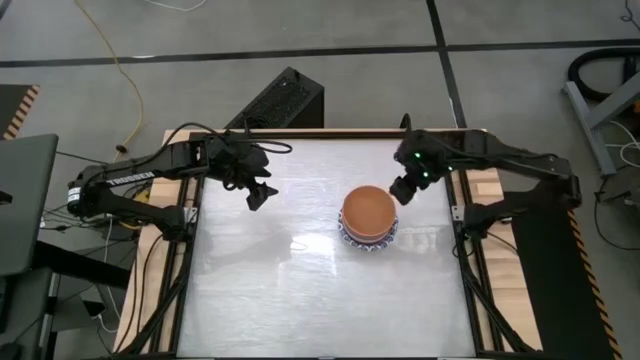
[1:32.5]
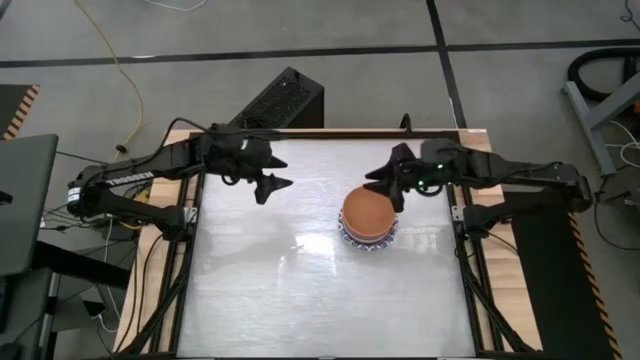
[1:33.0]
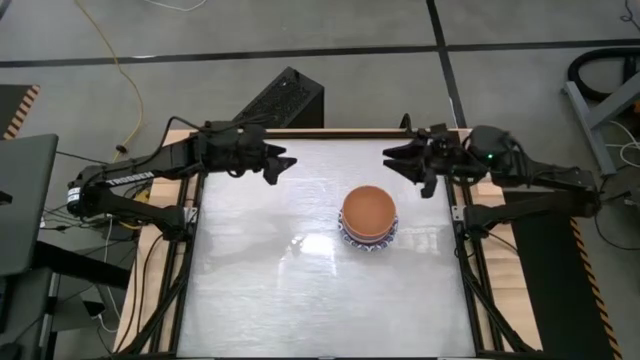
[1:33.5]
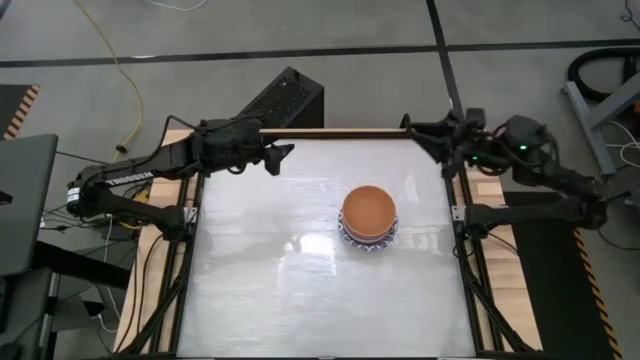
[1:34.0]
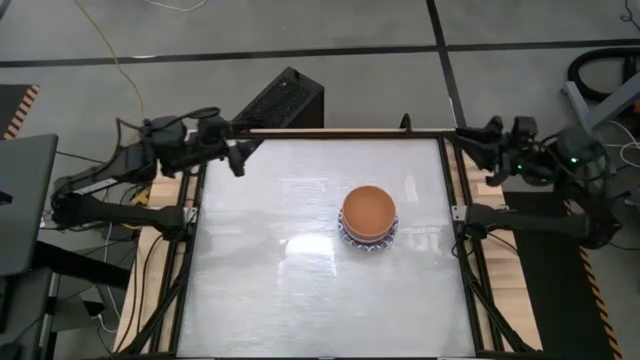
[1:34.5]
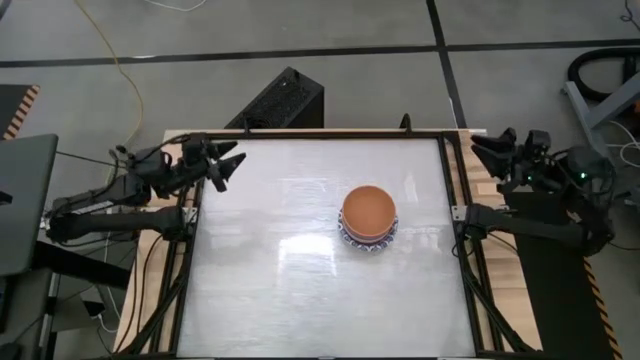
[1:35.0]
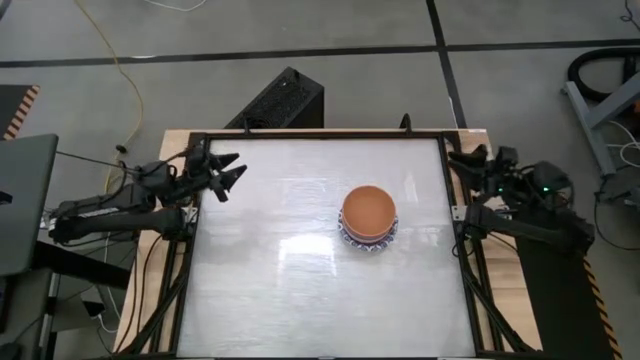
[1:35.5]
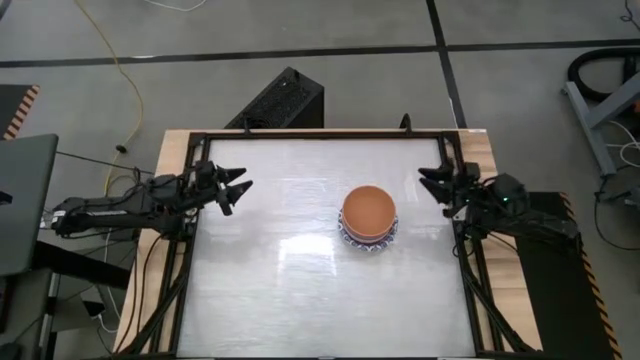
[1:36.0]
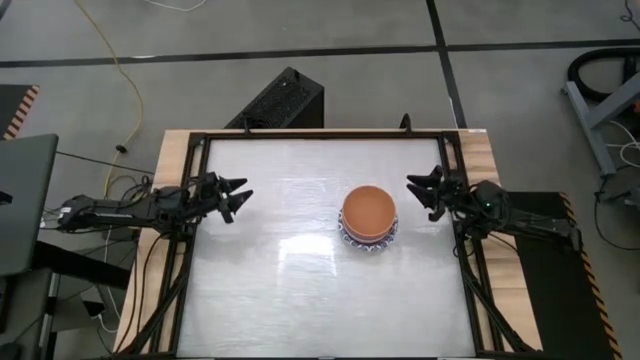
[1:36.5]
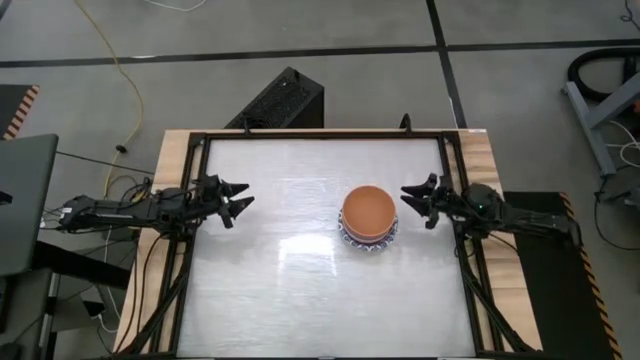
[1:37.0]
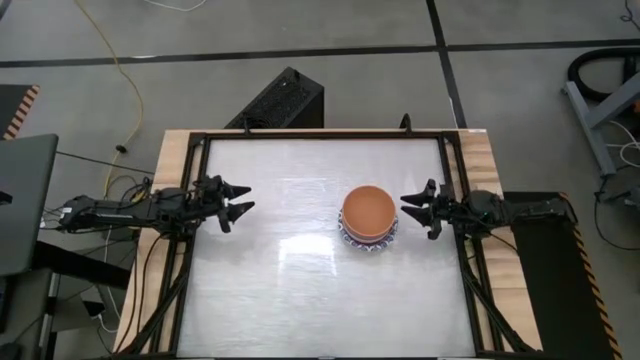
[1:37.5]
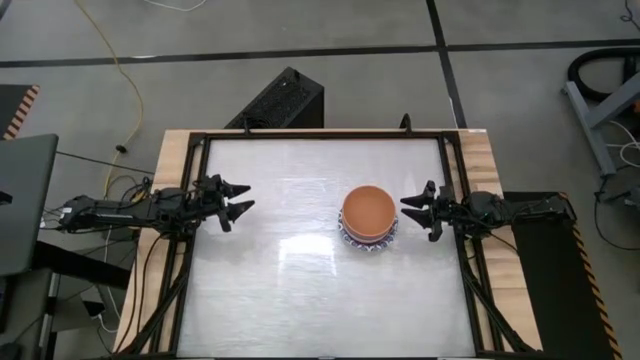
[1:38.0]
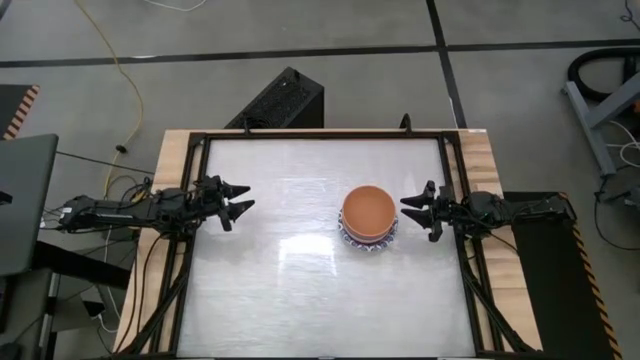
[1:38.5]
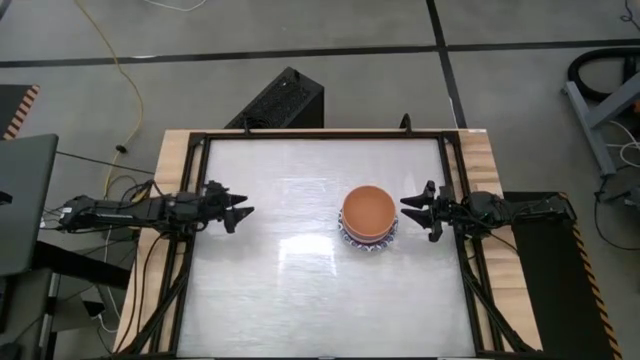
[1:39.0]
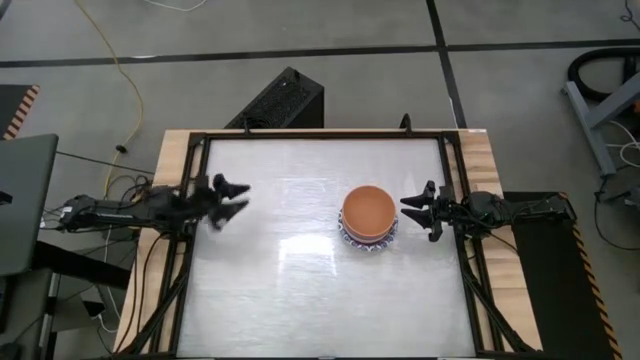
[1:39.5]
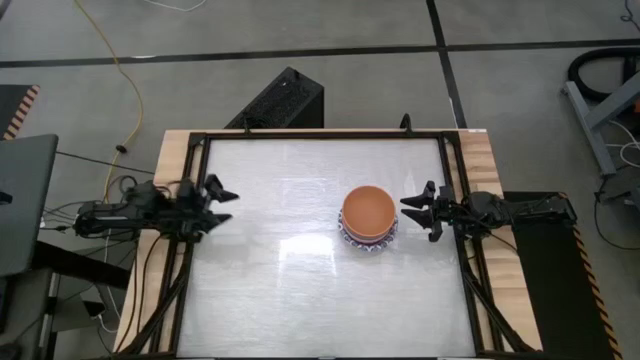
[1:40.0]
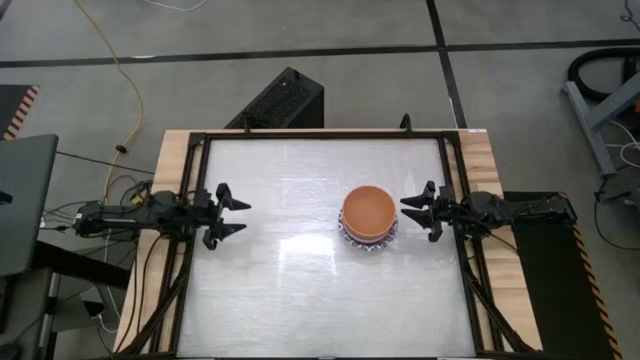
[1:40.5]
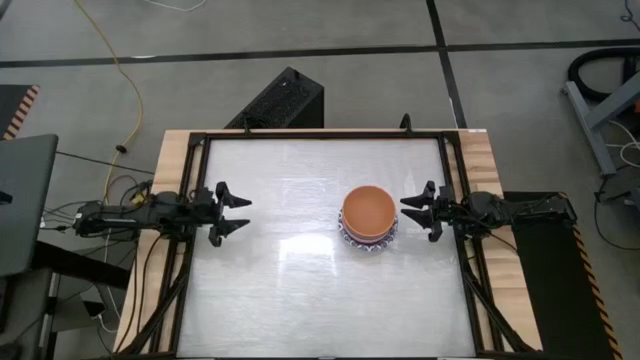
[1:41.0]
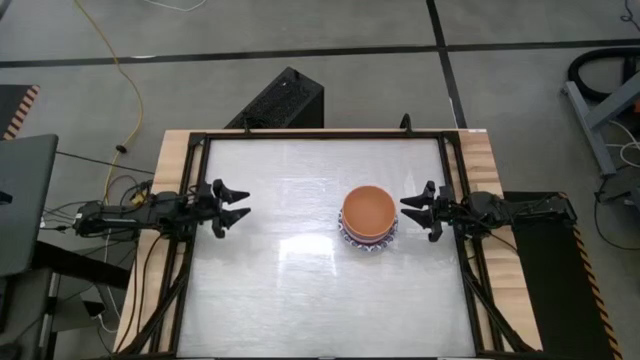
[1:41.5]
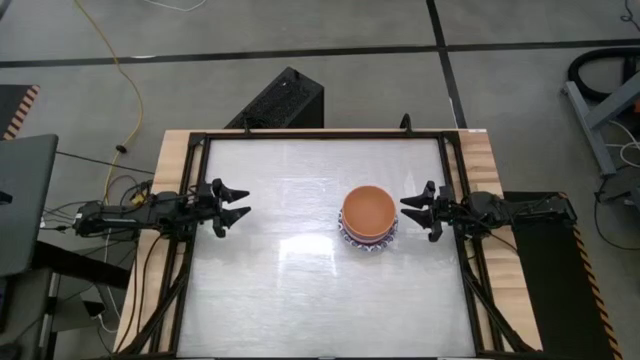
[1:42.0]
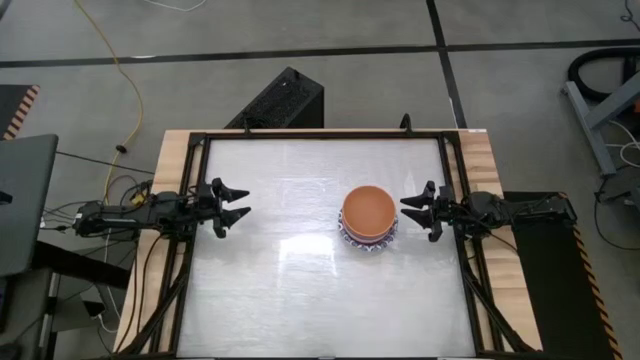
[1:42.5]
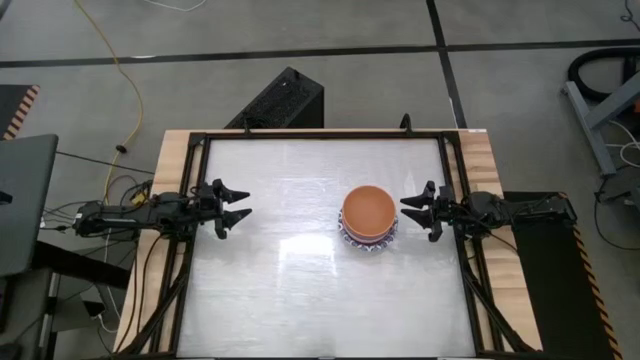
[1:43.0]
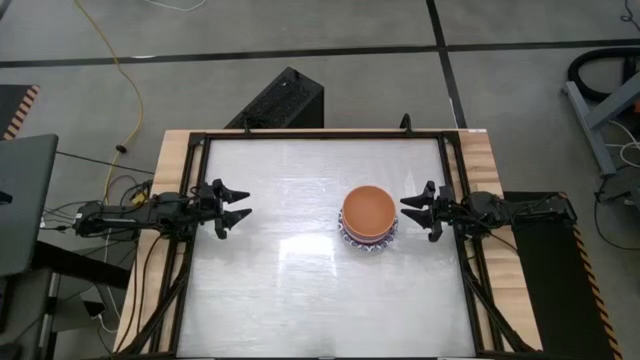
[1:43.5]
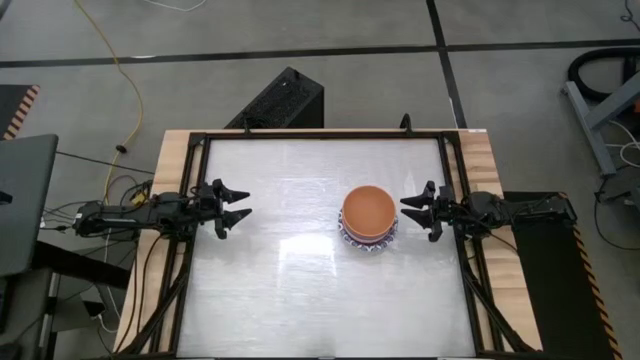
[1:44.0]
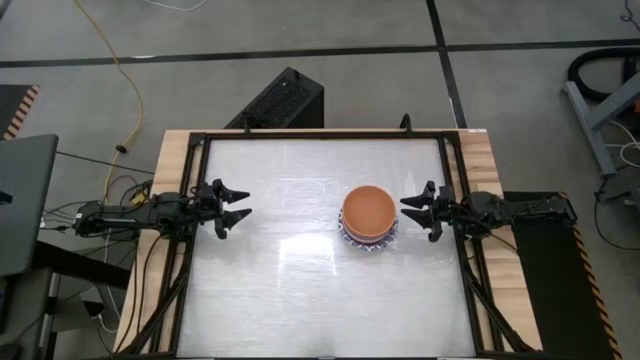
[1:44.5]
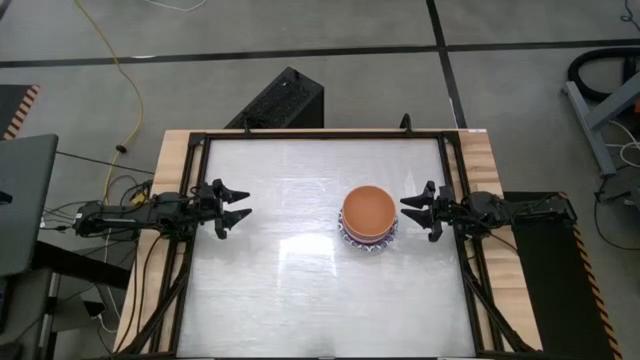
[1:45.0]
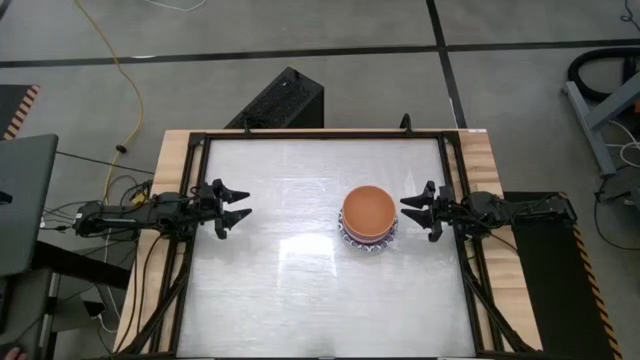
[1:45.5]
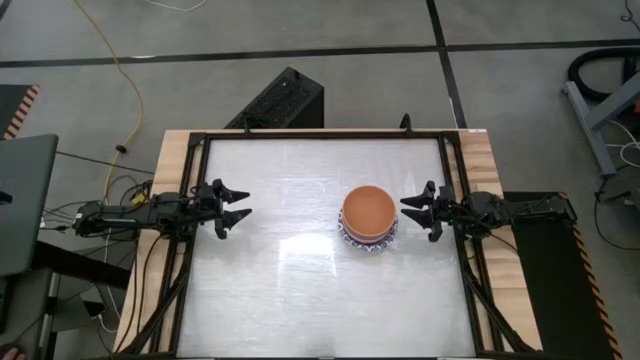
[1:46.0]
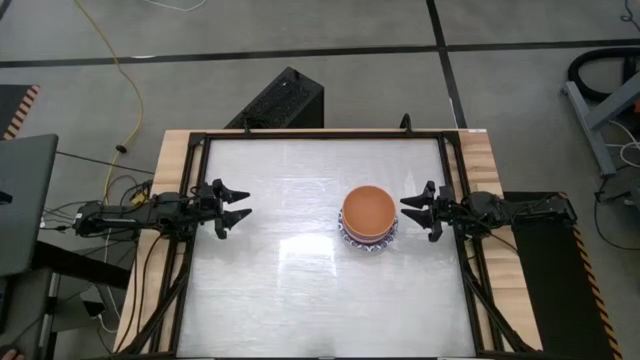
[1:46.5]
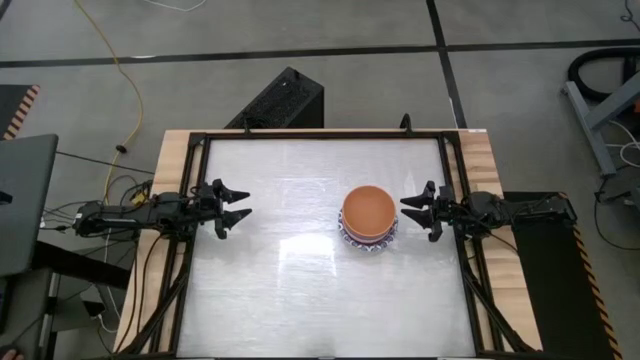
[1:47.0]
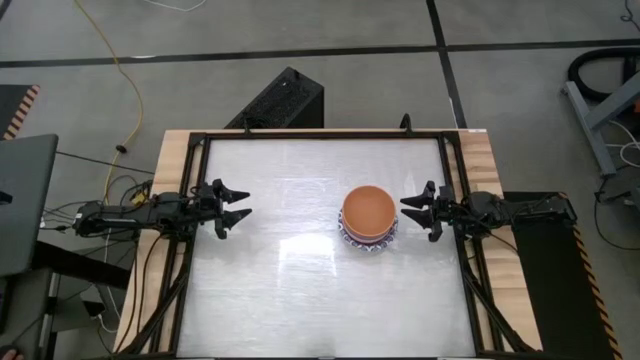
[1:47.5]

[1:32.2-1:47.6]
Return to Home Position
